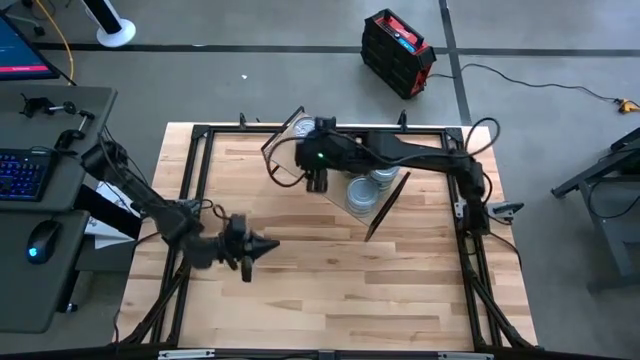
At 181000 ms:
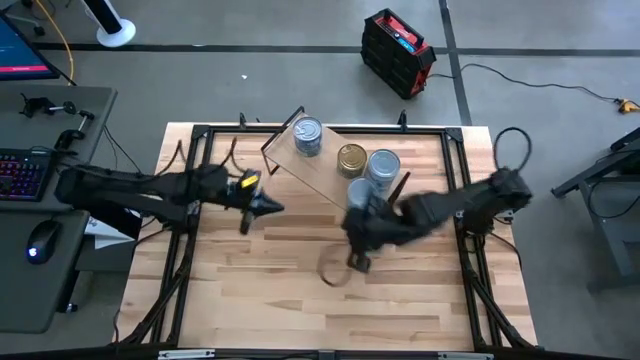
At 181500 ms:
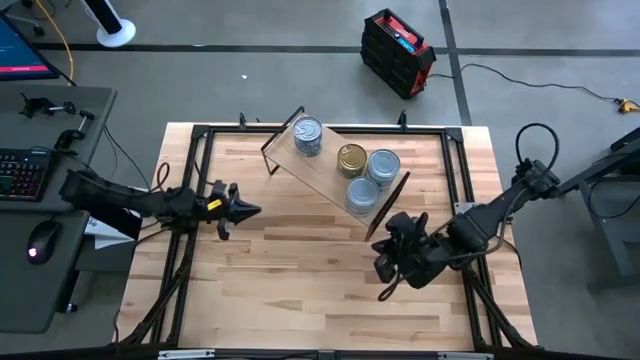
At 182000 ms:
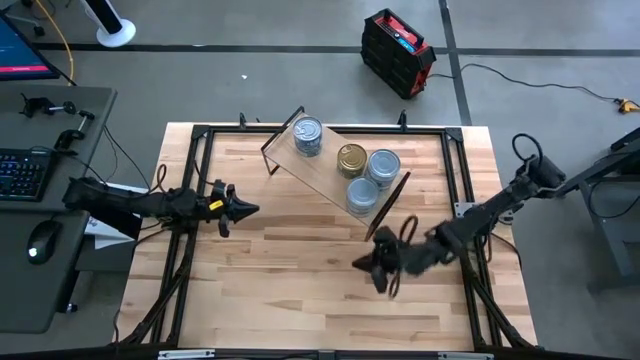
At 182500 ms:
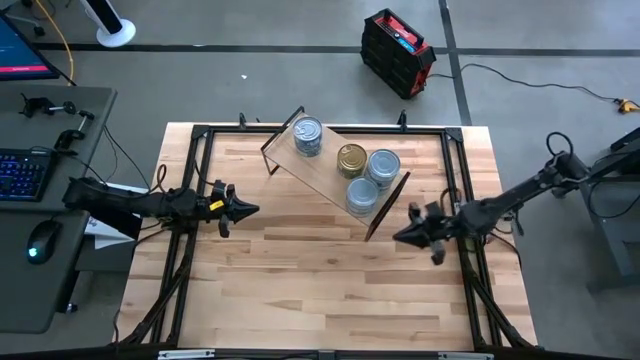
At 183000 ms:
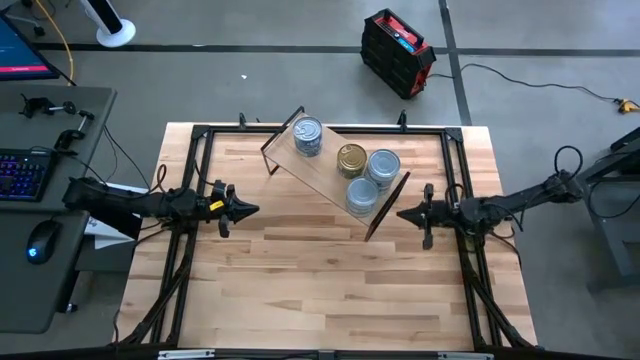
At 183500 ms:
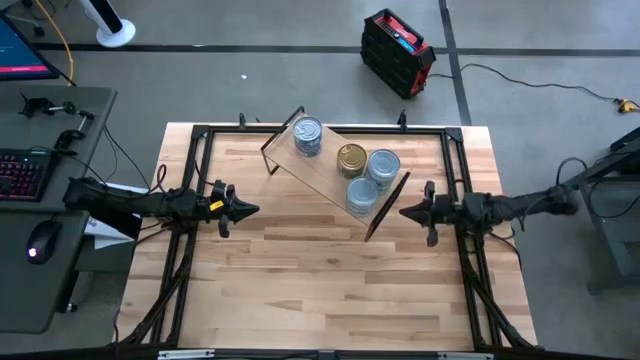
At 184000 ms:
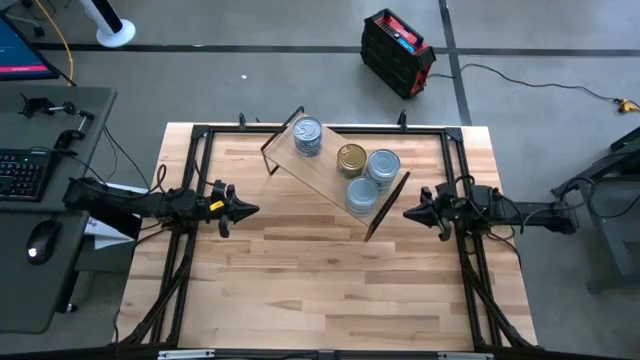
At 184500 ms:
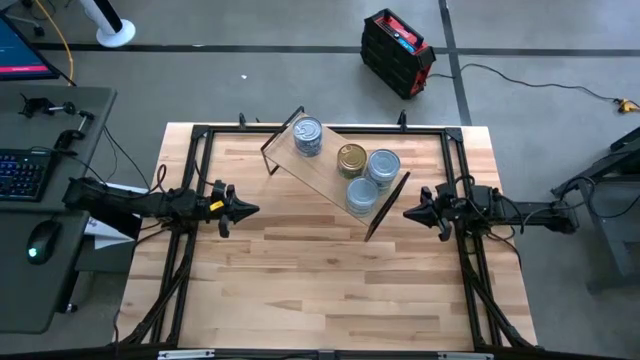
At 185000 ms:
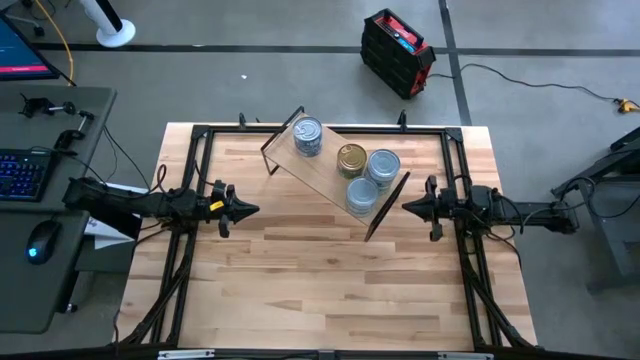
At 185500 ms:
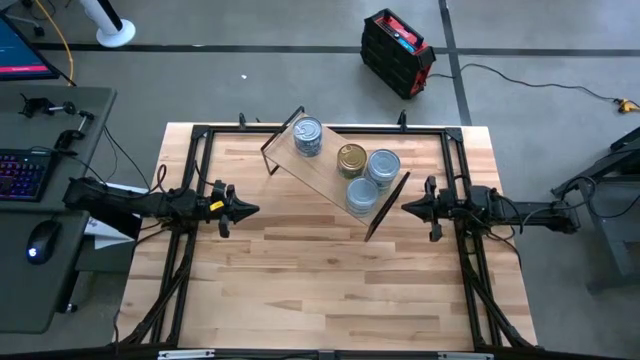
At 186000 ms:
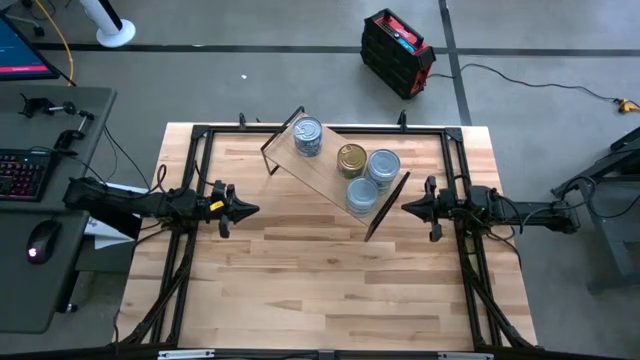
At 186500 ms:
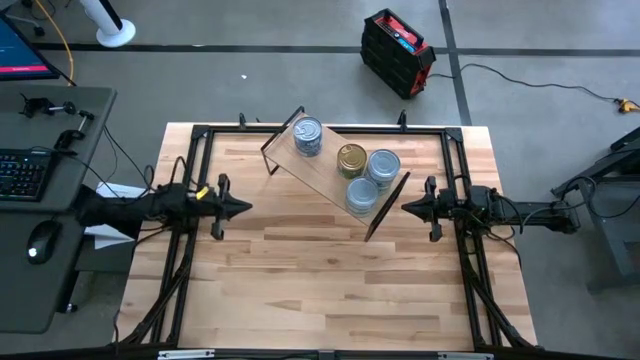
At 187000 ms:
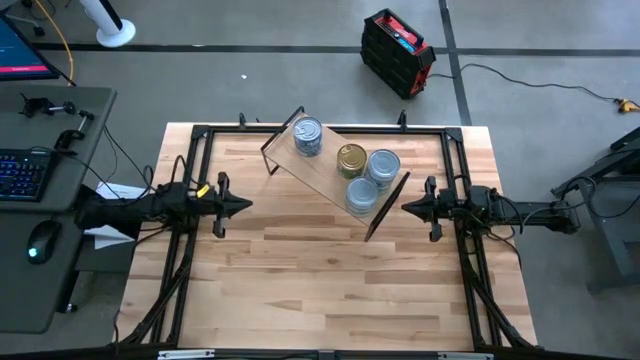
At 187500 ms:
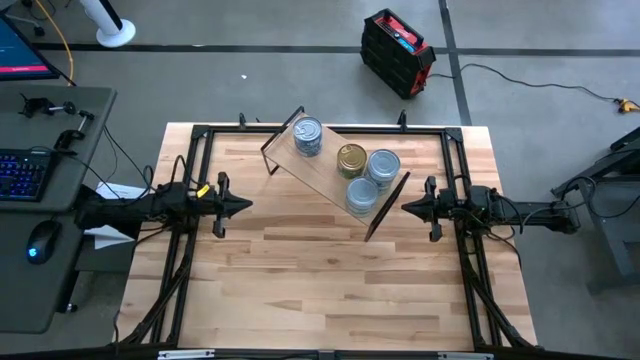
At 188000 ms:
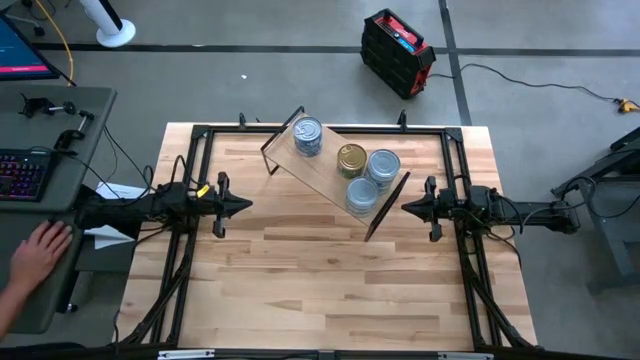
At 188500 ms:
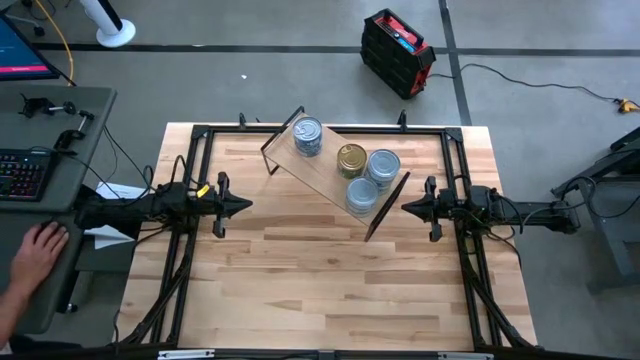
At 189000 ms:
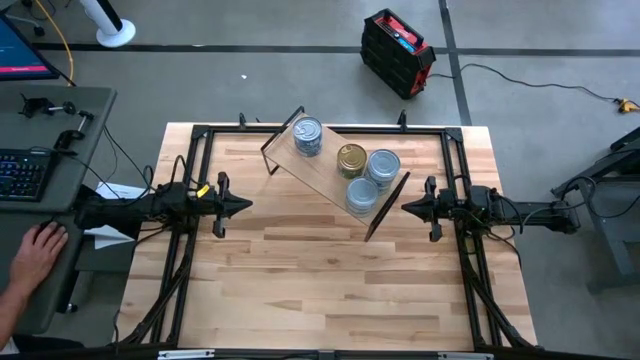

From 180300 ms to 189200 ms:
Task: Stack canned seafood by type on shelf
Return to Home Position

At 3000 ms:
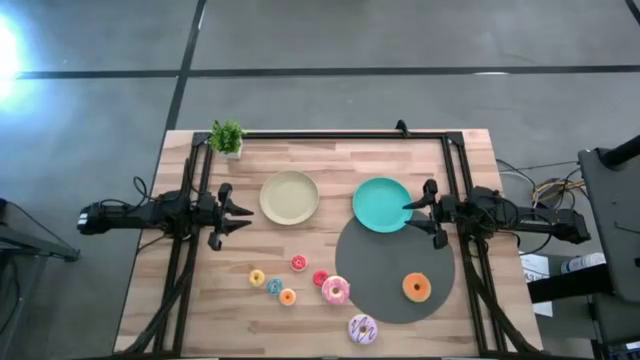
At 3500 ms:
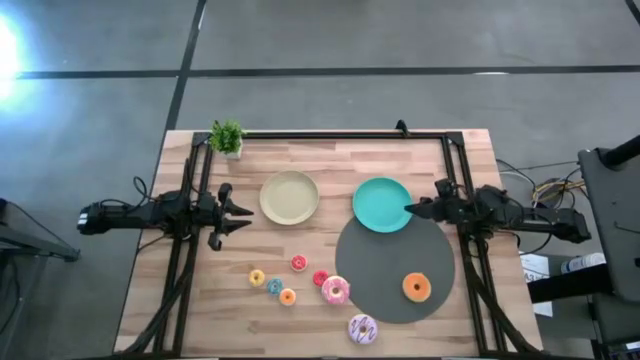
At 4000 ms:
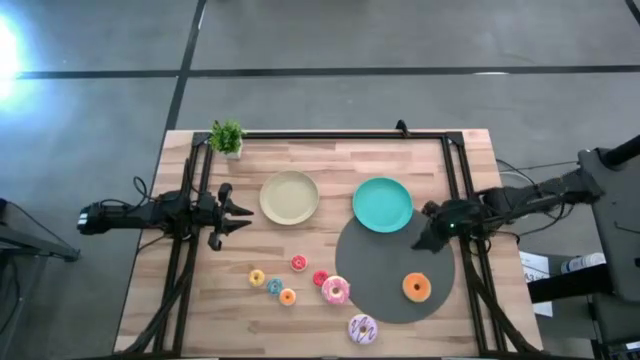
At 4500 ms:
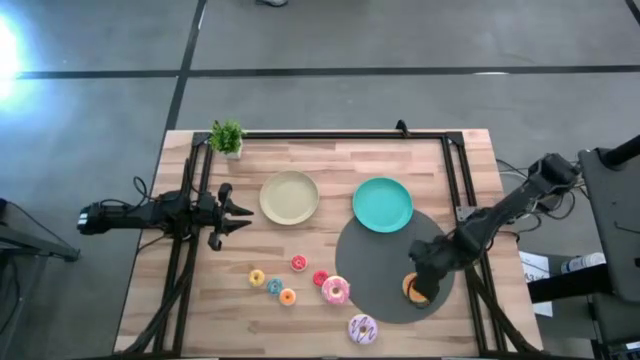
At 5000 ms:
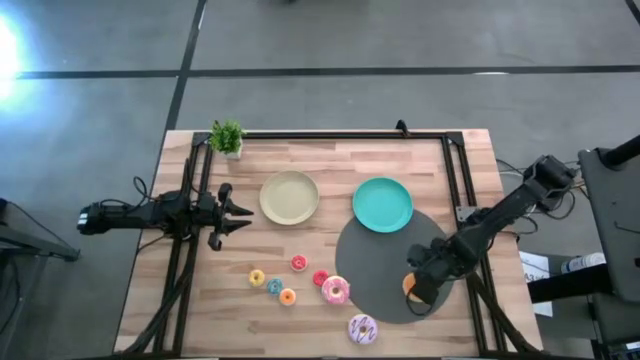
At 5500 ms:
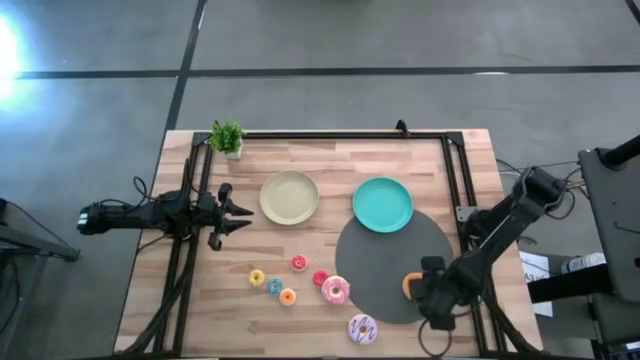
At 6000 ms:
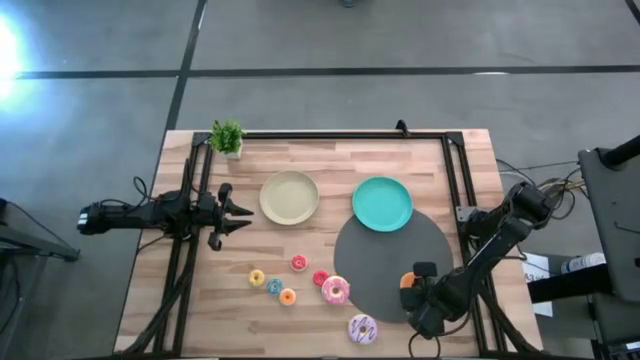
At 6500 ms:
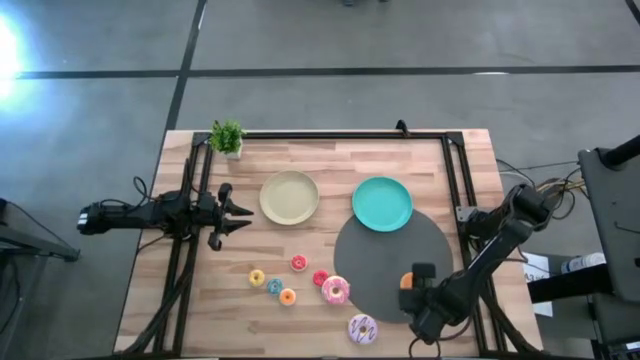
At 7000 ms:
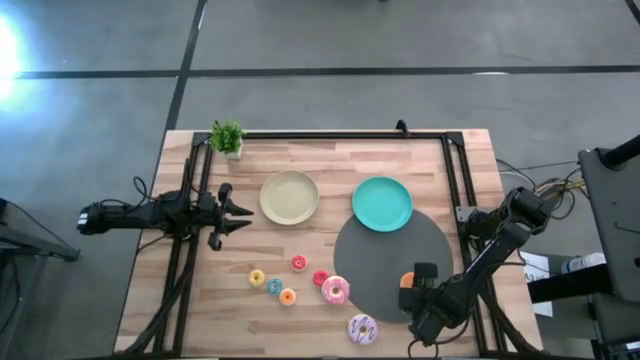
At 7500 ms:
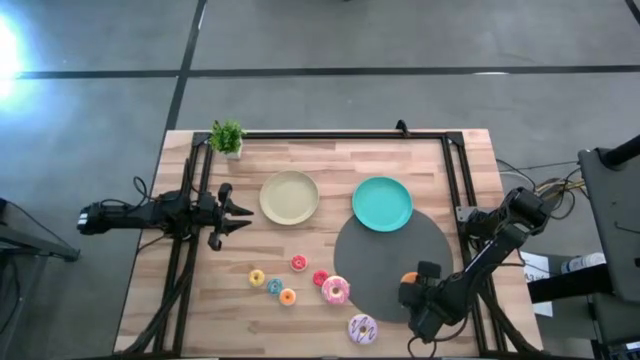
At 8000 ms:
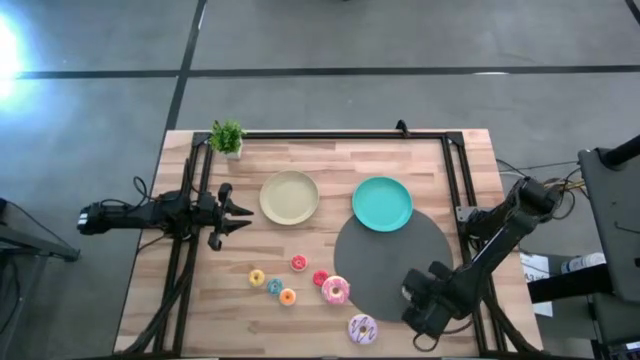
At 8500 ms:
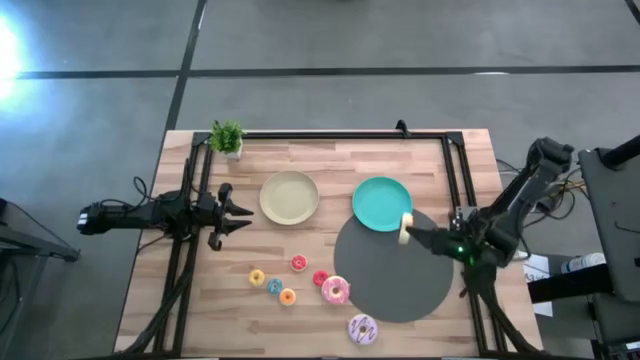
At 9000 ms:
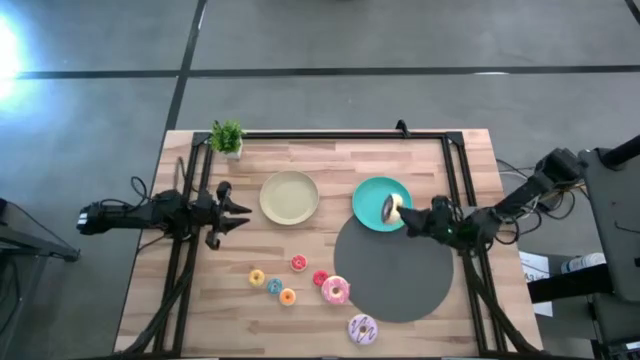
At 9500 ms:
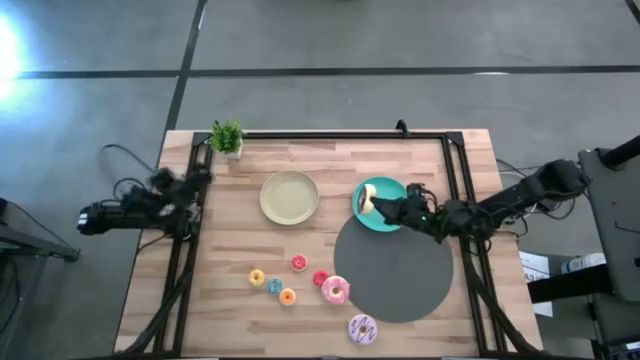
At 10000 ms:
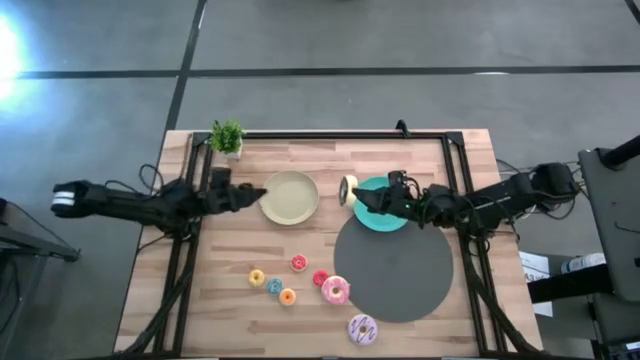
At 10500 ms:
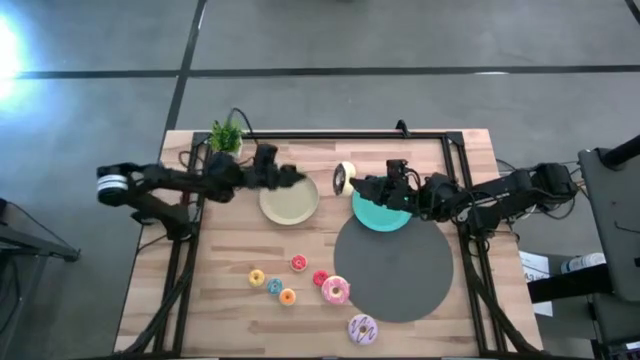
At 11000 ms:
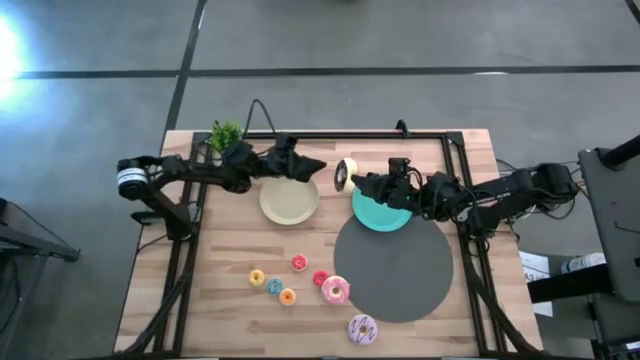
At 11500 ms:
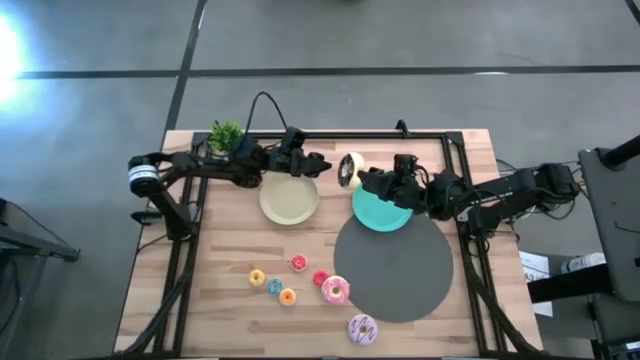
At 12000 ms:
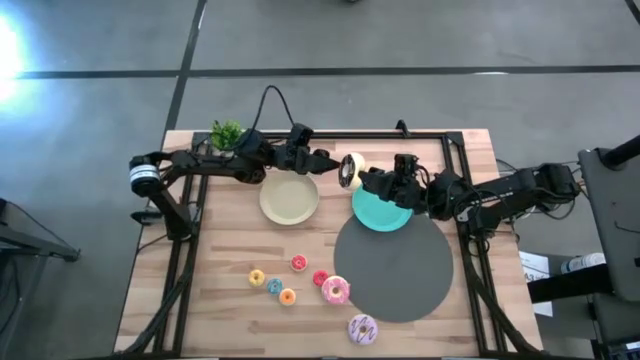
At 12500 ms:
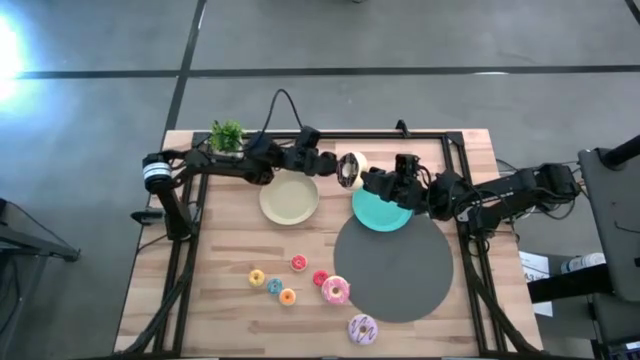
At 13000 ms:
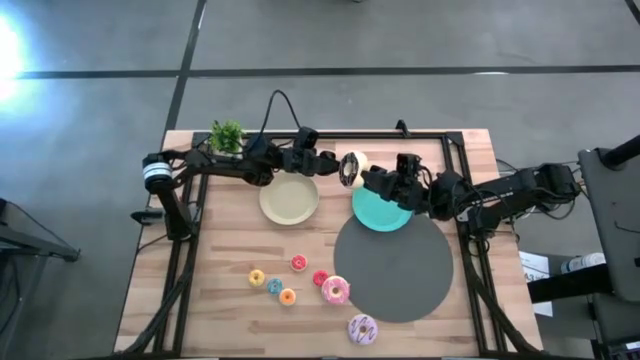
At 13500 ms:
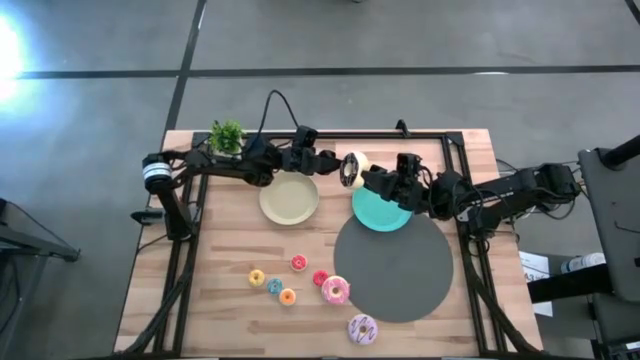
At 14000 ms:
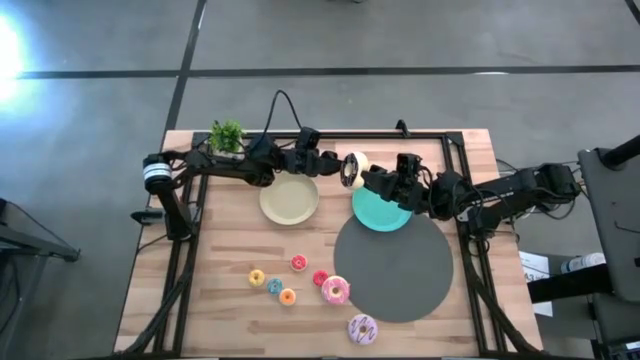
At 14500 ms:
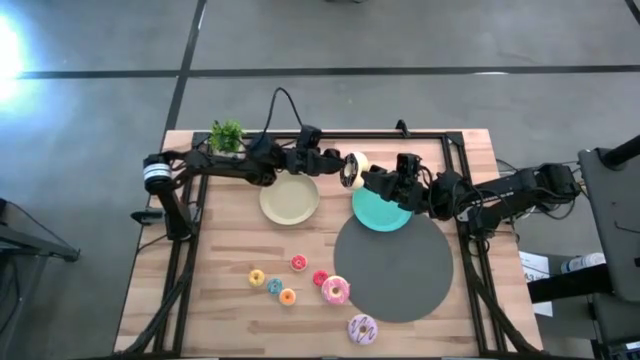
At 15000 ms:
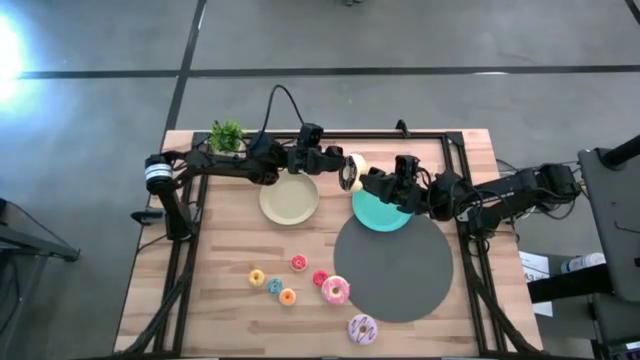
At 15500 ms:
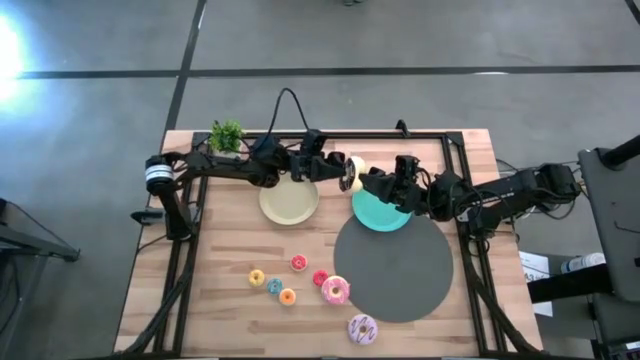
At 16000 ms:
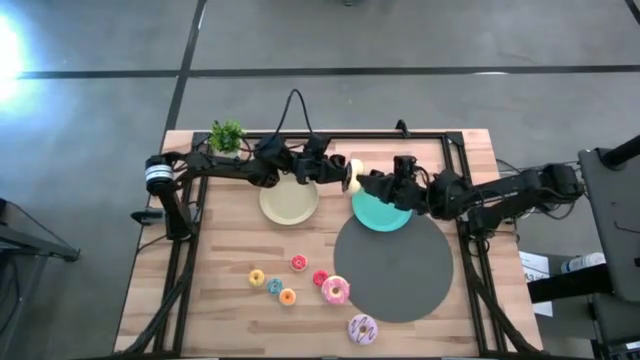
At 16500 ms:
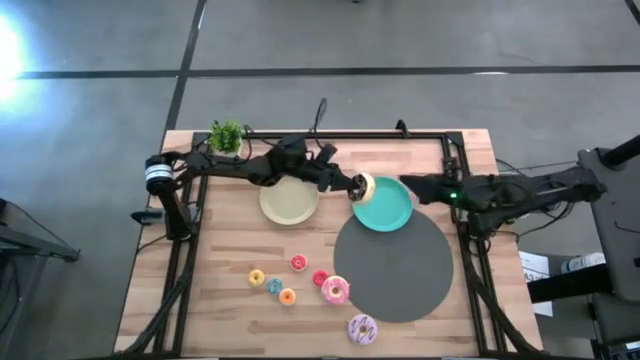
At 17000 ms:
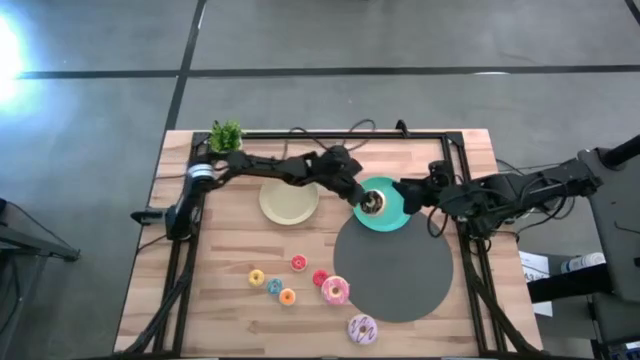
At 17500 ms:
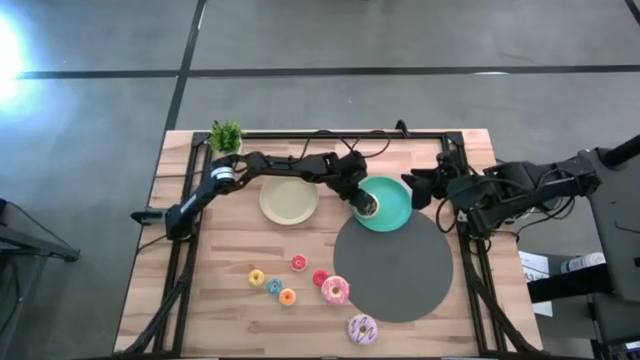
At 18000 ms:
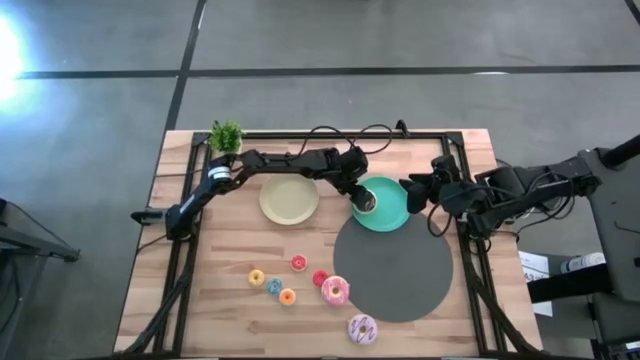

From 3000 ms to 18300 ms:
Task: Pick & Place donuts
Put the large black donut on the blue plate
